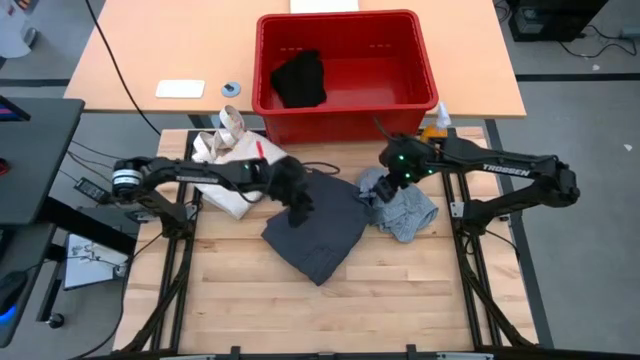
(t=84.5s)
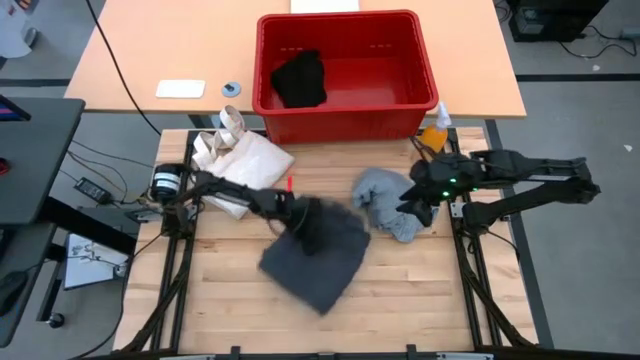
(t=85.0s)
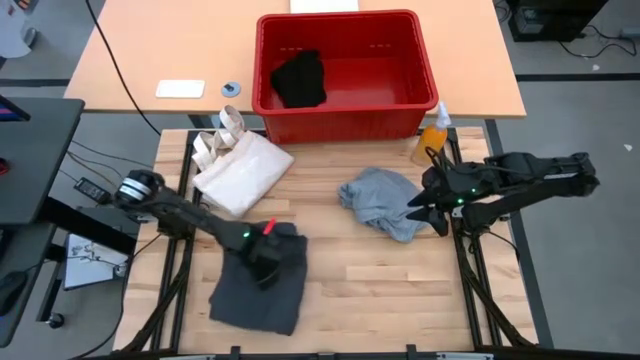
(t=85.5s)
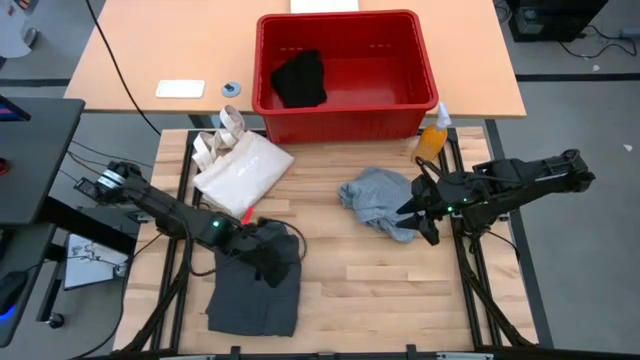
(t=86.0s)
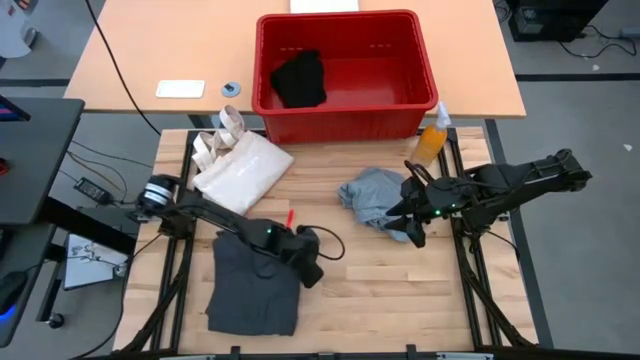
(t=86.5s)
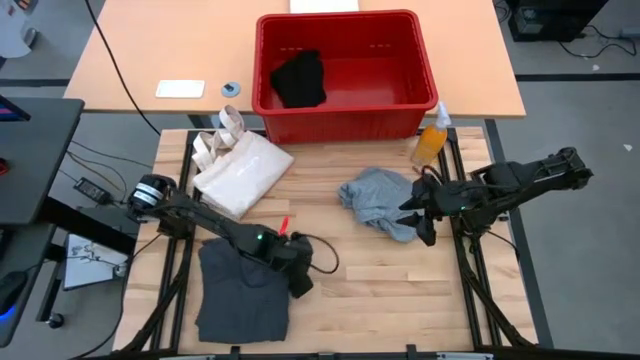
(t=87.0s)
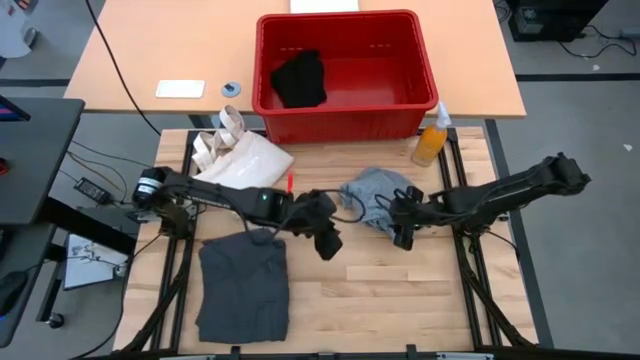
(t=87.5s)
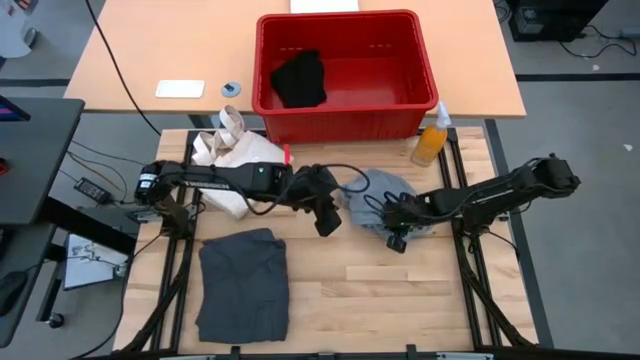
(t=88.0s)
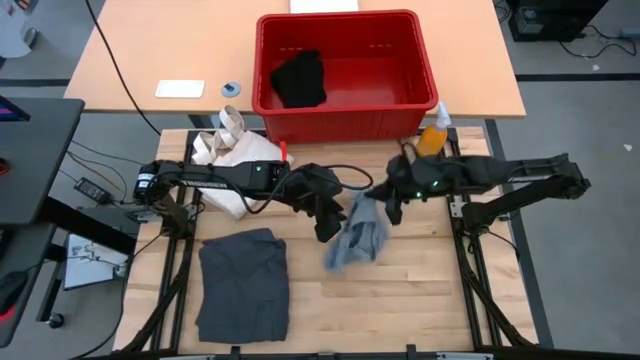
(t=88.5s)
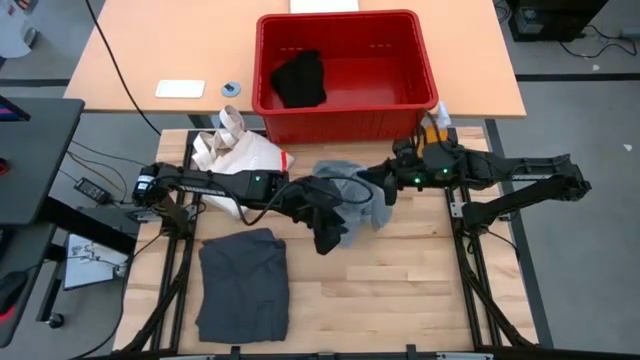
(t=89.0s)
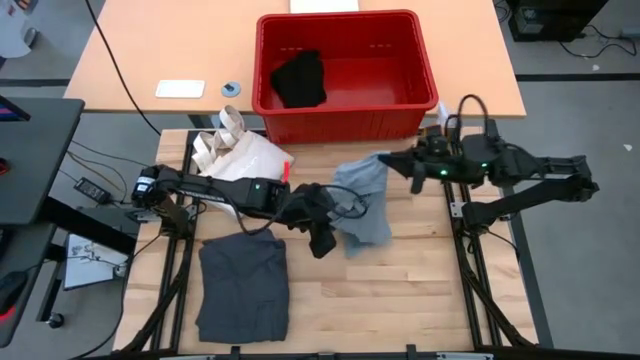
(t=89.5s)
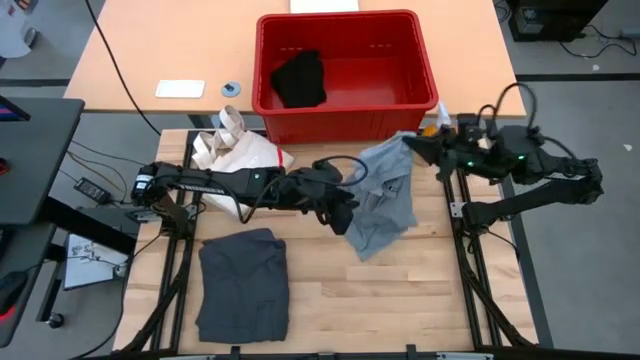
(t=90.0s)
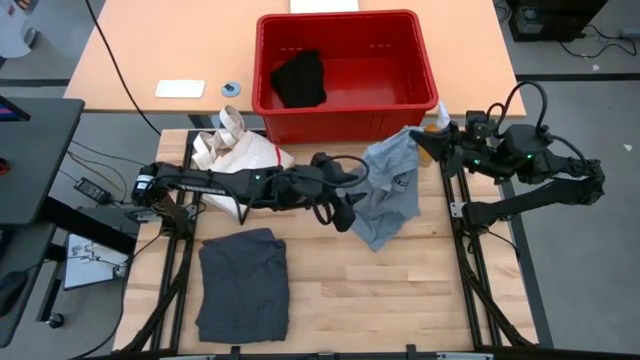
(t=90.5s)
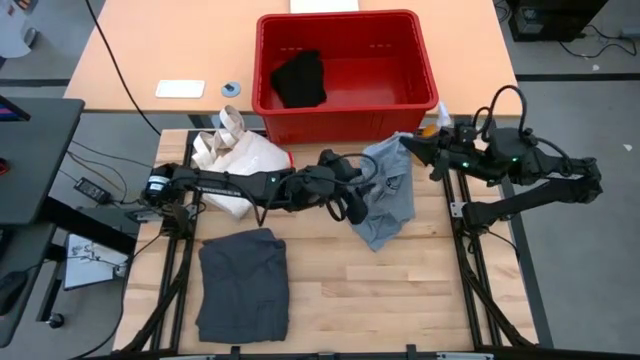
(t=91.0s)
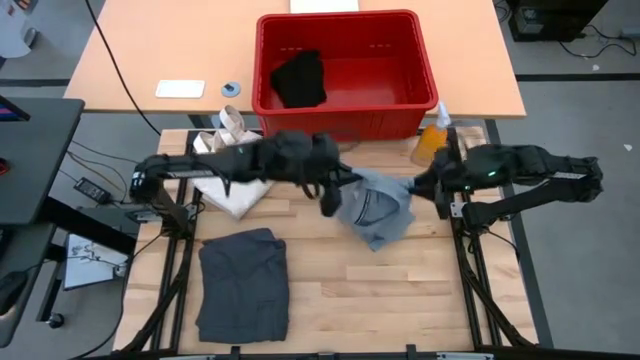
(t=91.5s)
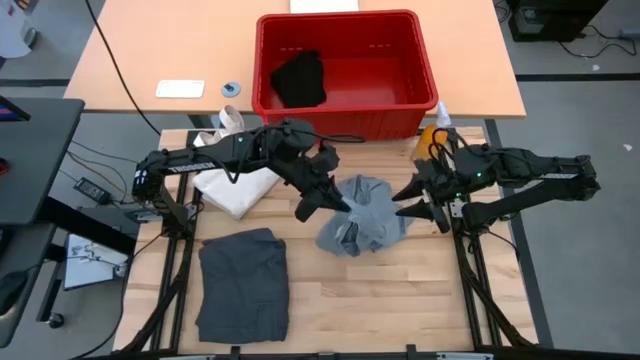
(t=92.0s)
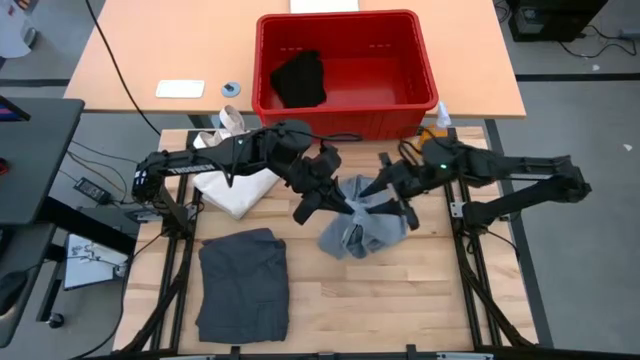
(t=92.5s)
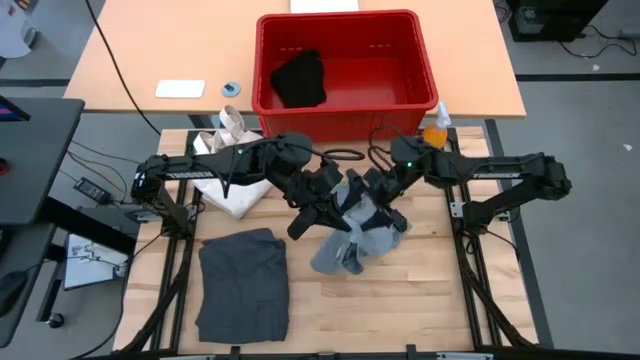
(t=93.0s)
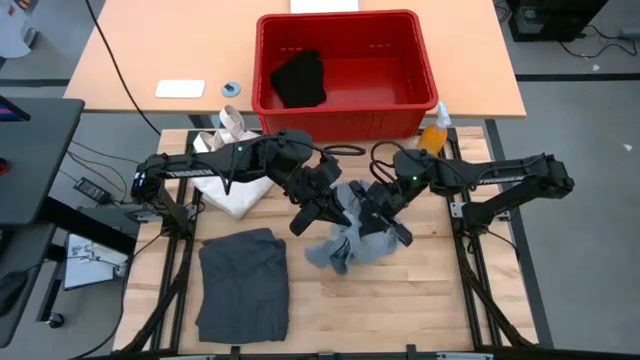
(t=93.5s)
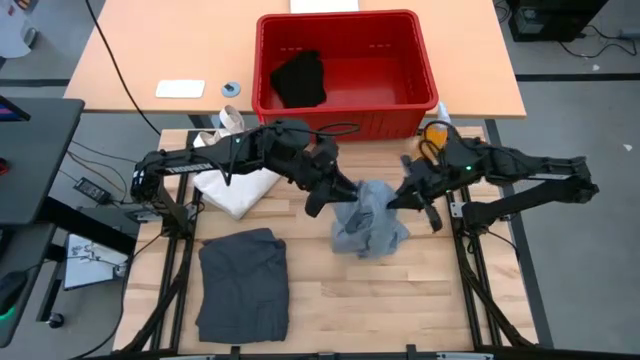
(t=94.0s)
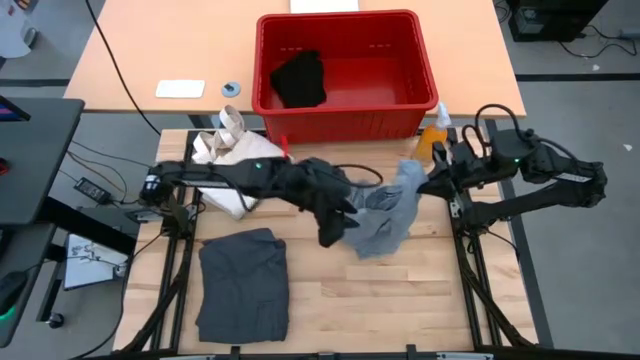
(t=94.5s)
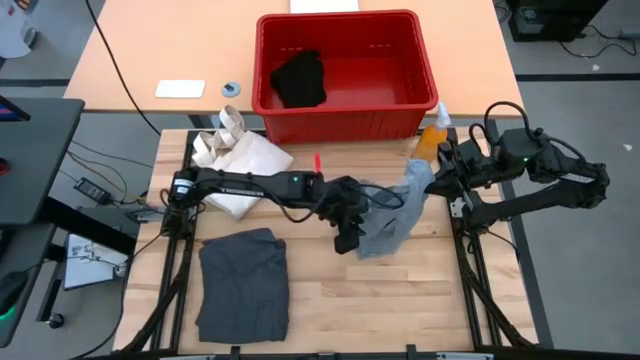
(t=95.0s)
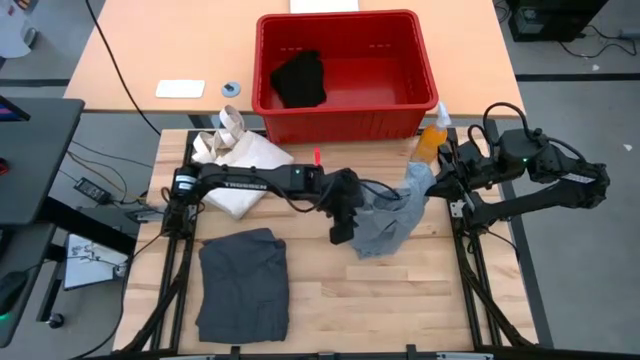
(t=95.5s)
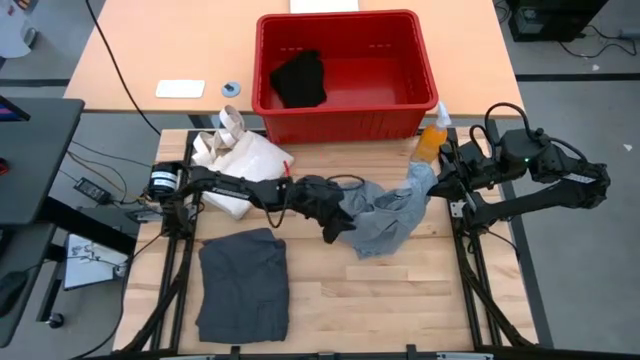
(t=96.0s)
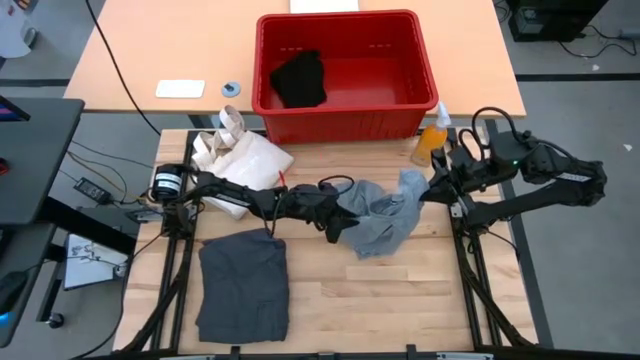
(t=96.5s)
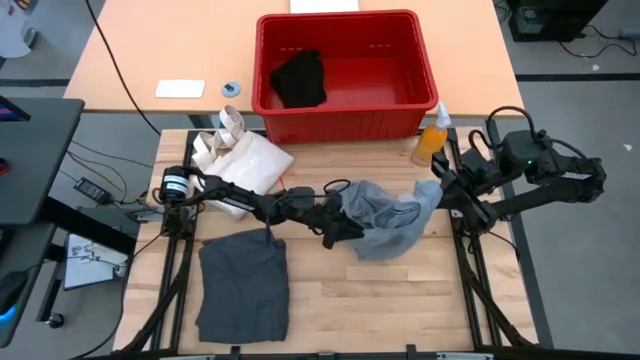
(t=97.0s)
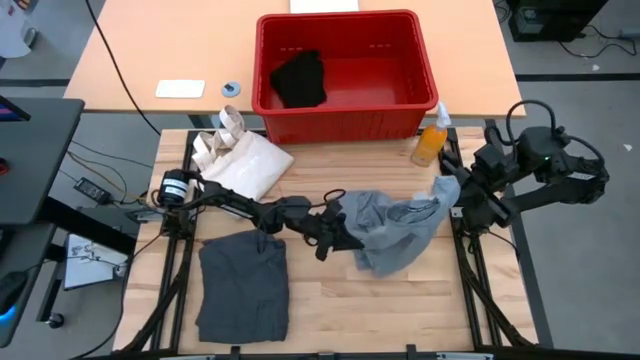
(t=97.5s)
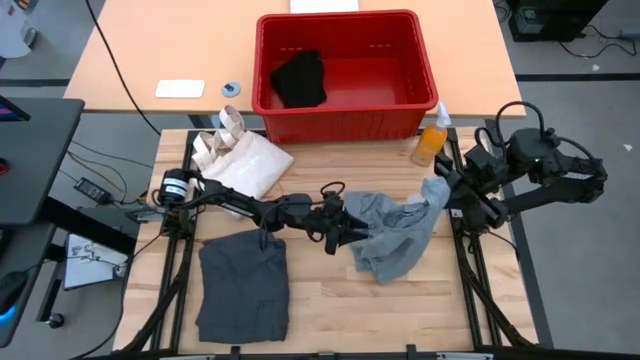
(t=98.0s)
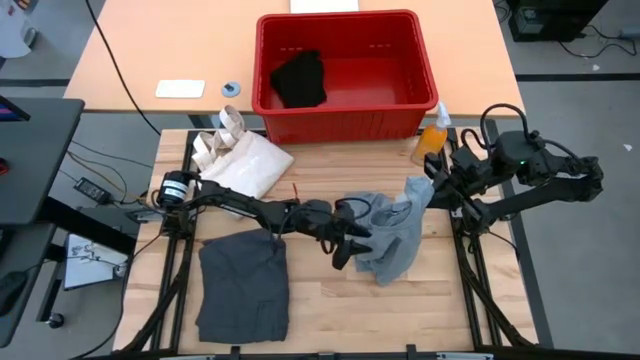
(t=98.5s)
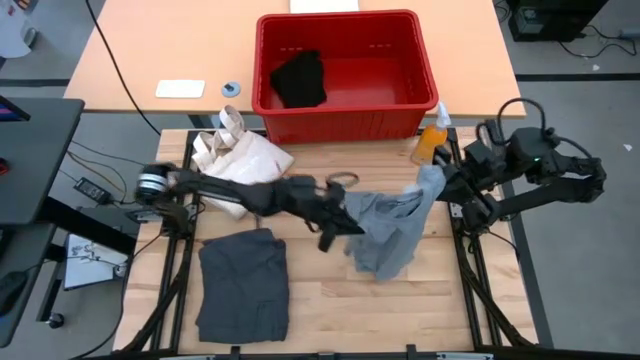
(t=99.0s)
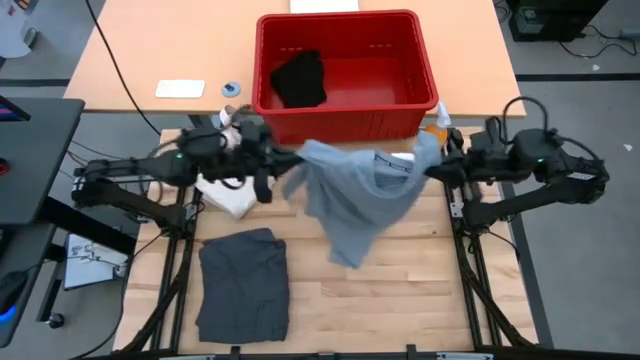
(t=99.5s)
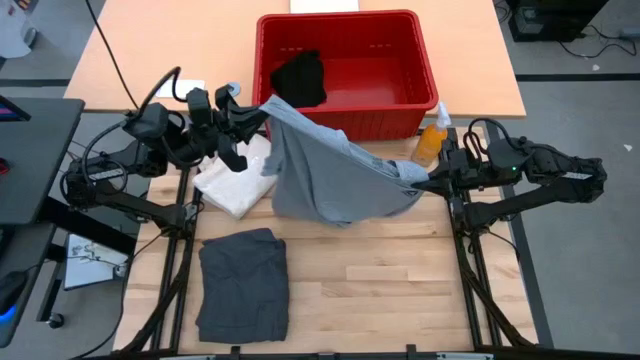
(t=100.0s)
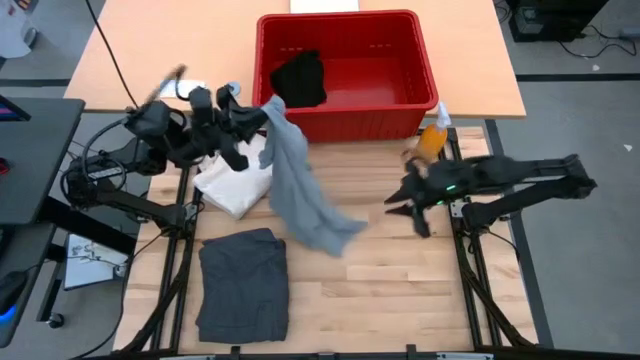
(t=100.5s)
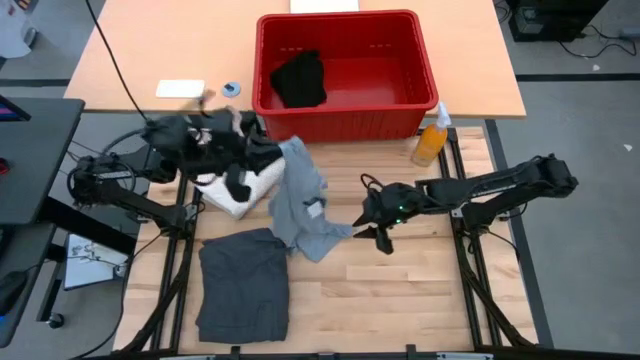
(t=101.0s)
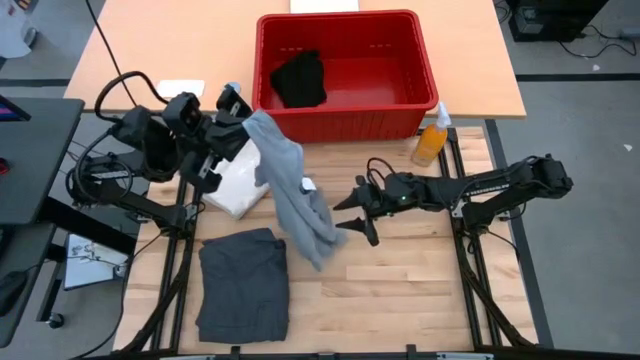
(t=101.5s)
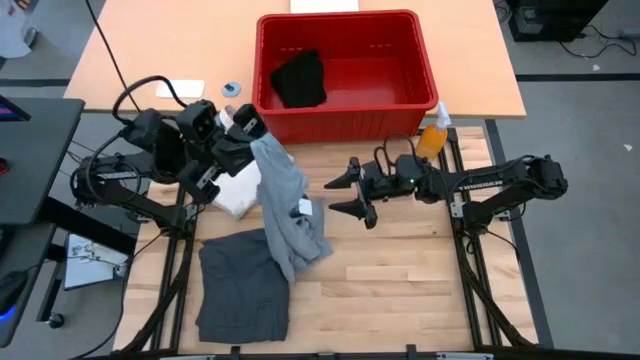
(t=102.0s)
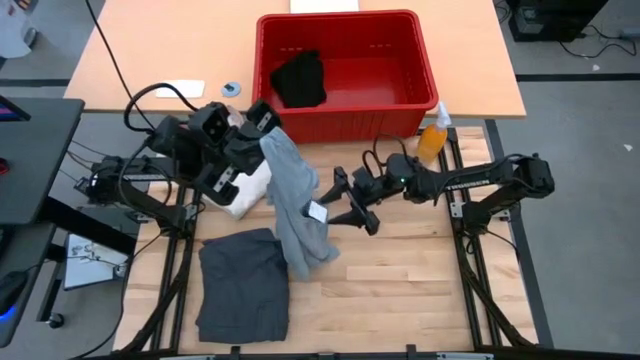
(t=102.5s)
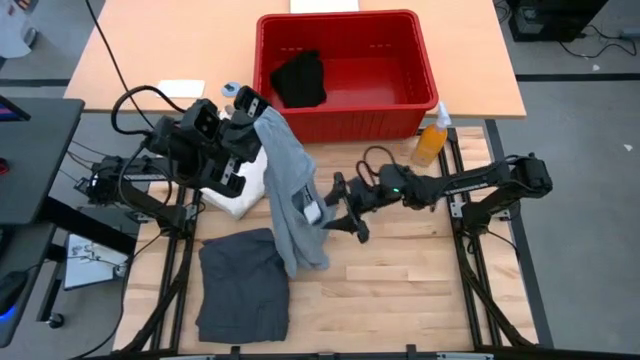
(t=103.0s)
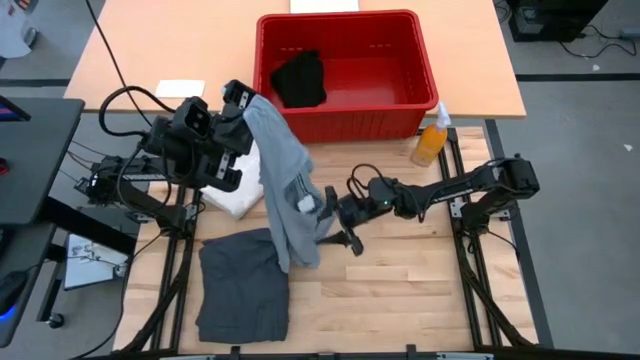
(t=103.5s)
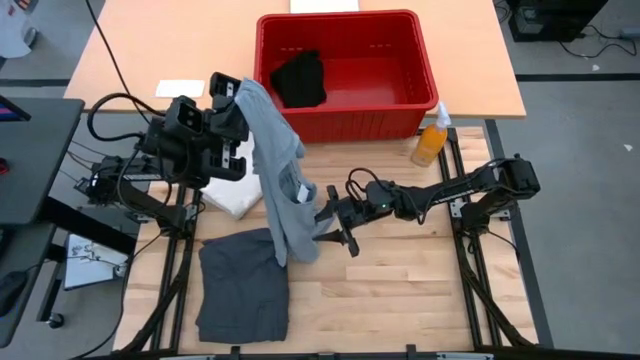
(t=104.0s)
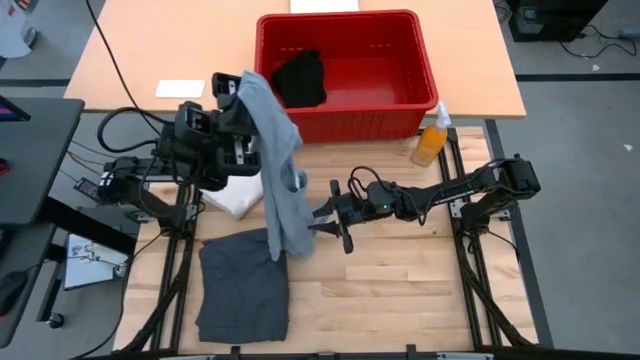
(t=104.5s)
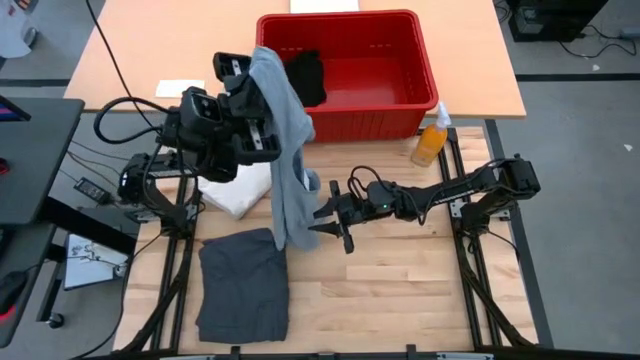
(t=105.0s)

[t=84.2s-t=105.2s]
Task: Fold Laundry from Bin
Fold the light gray t-shirt
